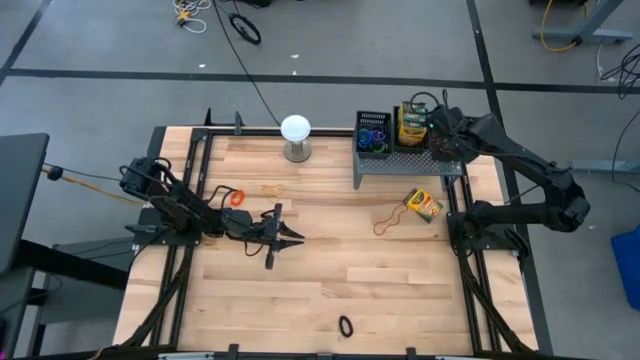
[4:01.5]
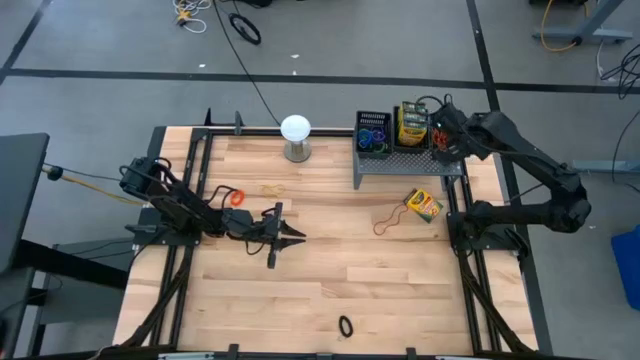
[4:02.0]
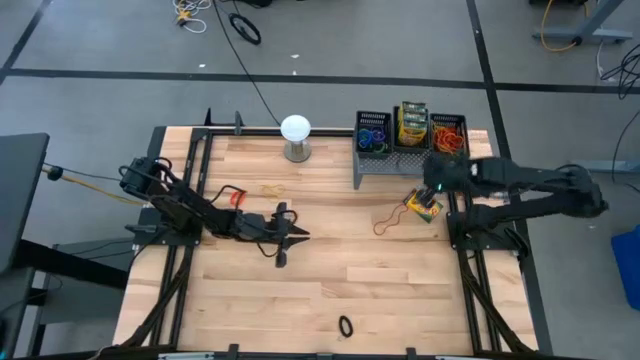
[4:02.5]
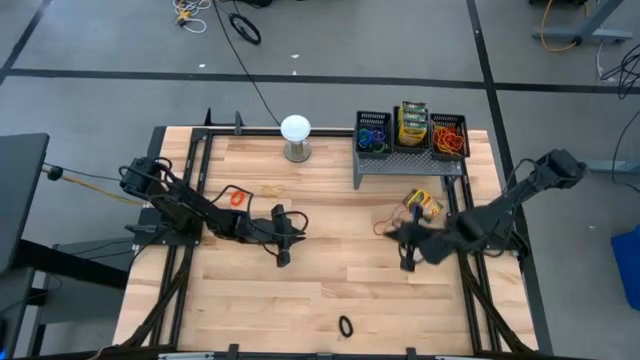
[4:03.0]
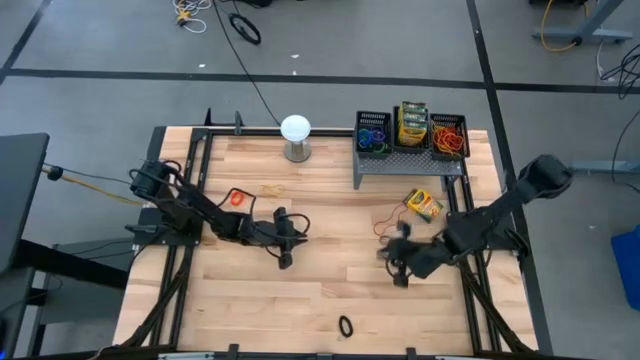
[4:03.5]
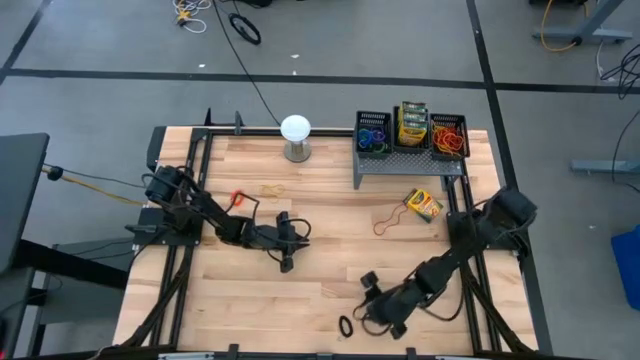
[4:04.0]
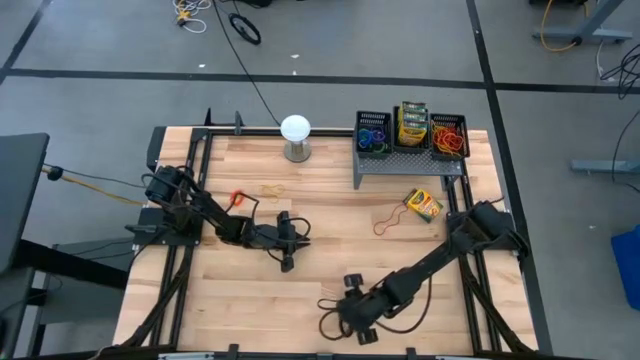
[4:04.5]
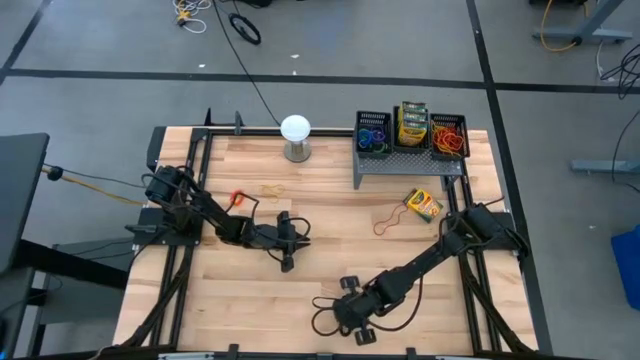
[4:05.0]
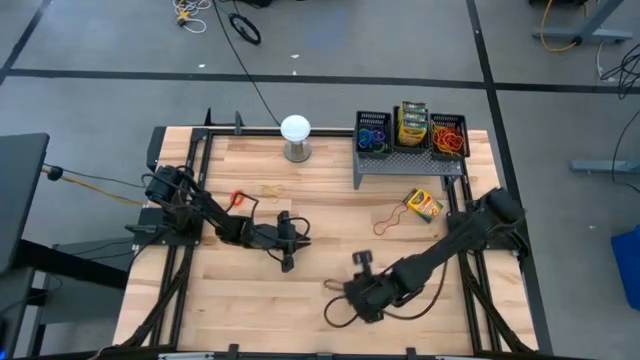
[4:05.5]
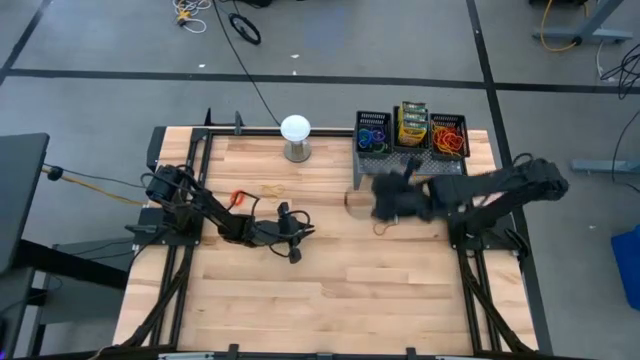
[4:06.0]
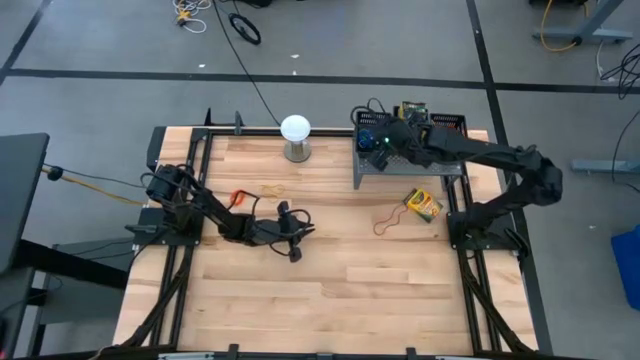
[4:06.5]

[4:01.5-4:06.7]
Task: Pick & Place Office Desk Supplies
Put the black spring keychain into the left black basket on the shelf

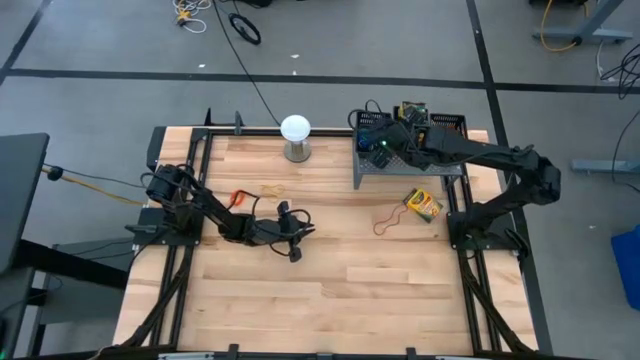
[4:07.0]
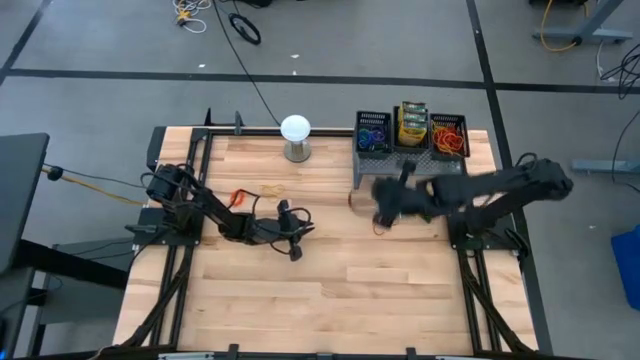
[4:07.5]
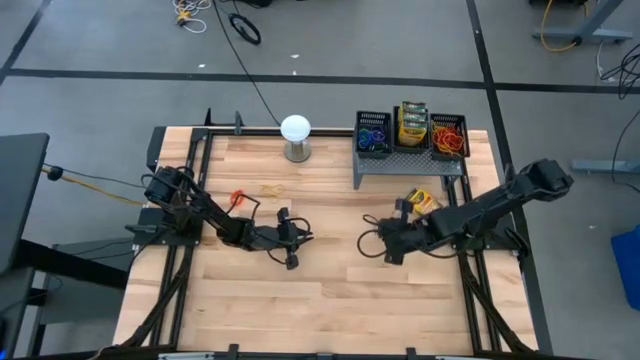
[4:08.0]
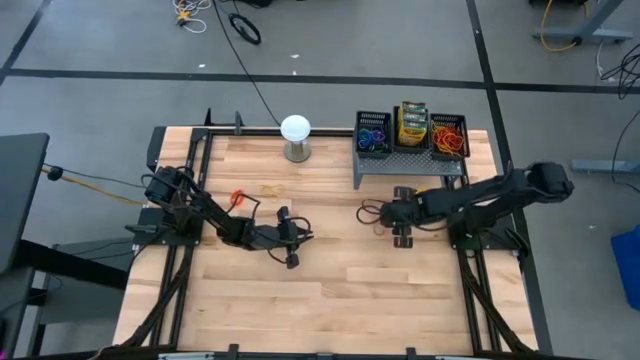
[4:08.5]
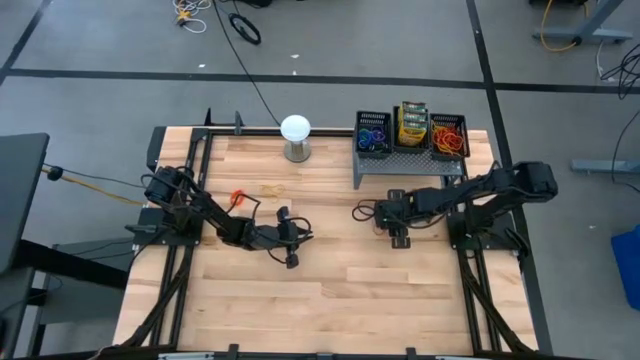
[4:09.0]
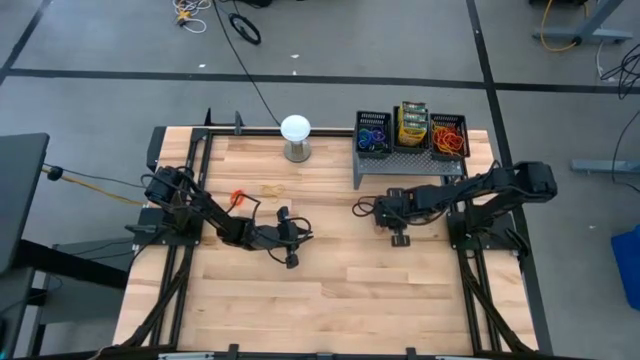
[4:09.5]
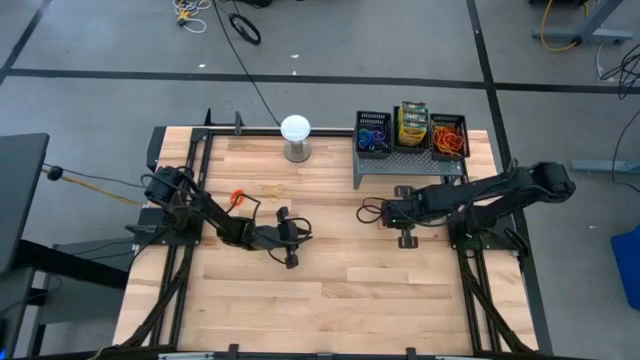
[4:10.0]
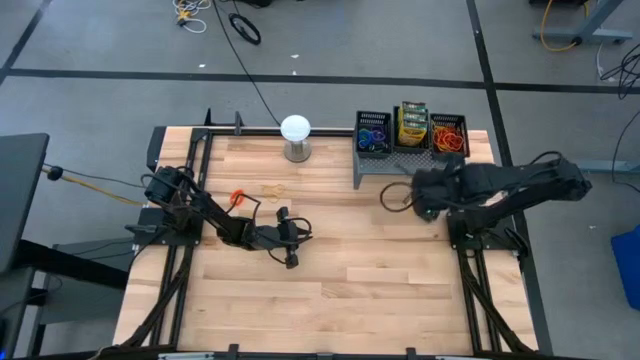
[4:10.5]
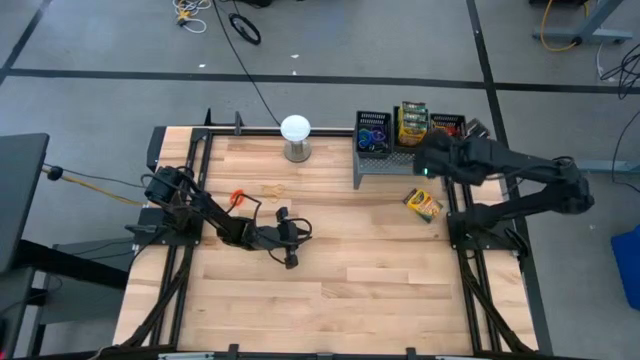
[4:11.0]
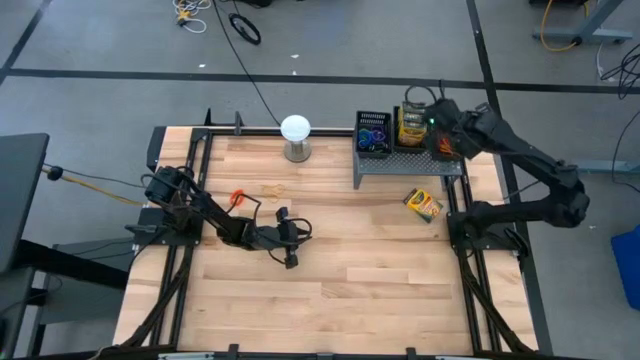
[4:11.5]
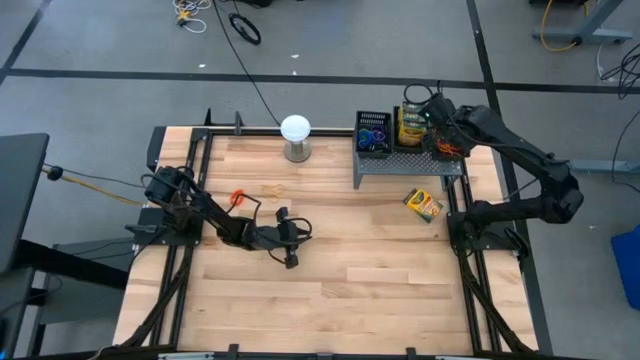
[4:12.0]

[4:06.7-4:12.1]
Put the red rubberband into the right black basket on the shelf

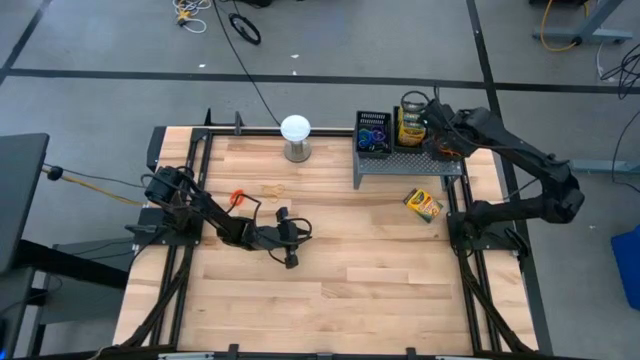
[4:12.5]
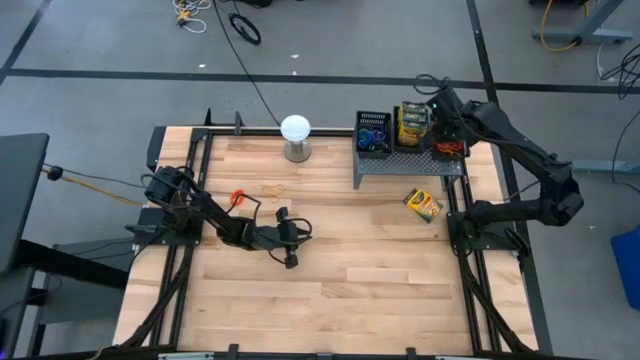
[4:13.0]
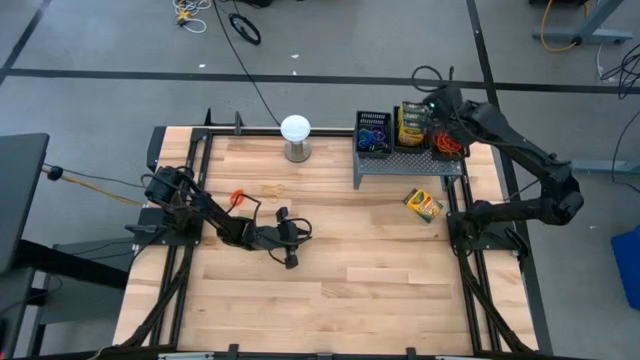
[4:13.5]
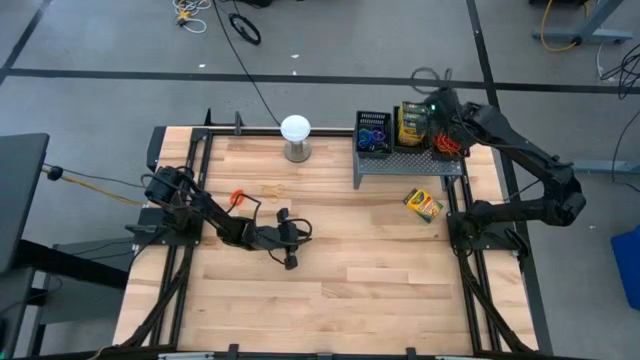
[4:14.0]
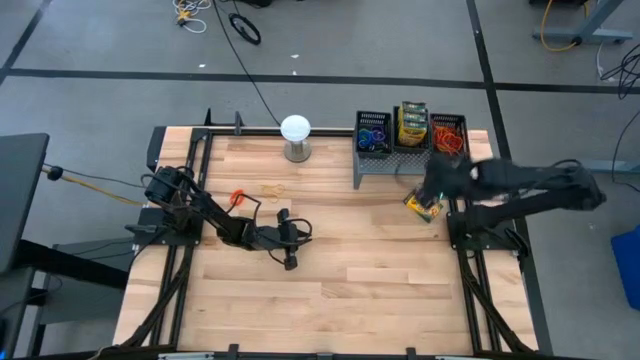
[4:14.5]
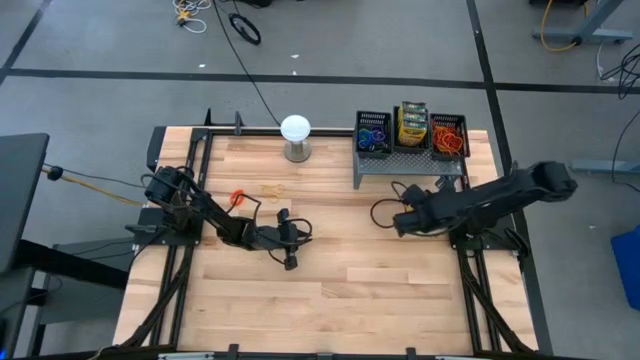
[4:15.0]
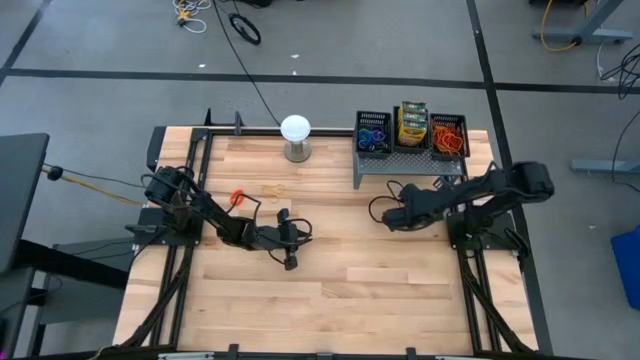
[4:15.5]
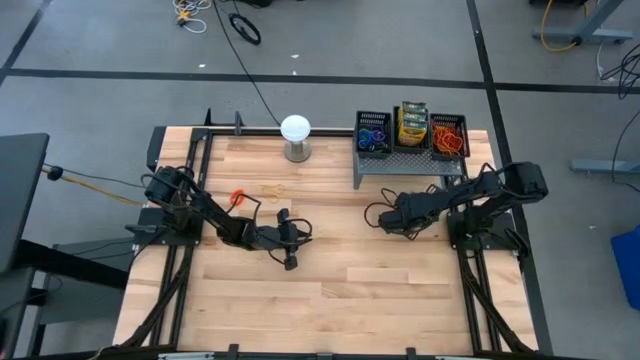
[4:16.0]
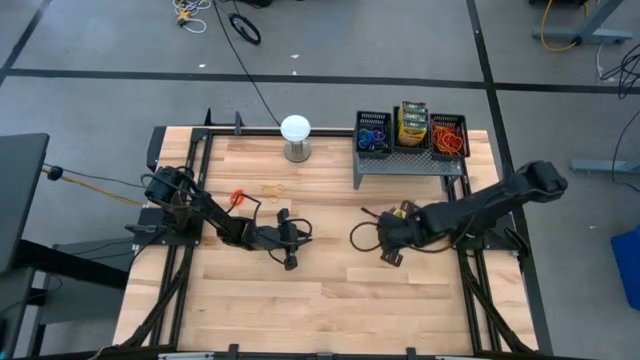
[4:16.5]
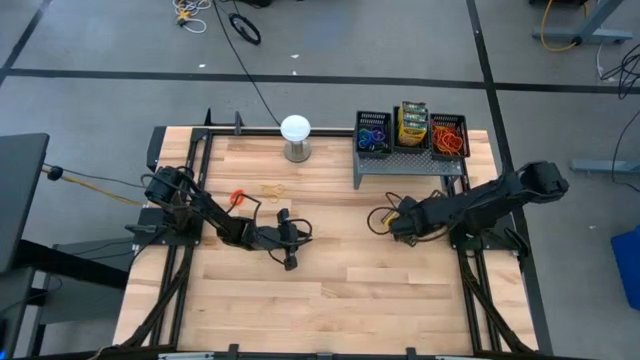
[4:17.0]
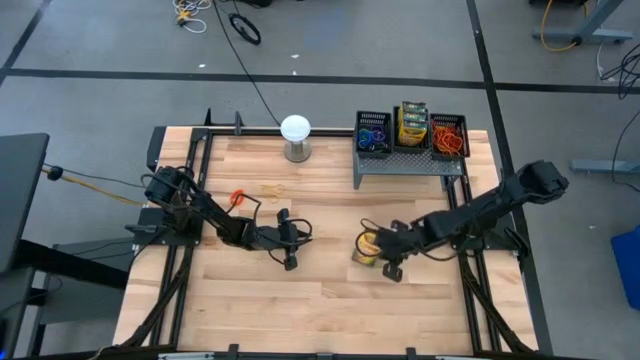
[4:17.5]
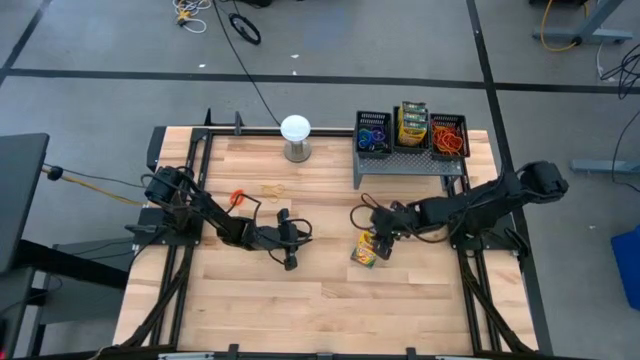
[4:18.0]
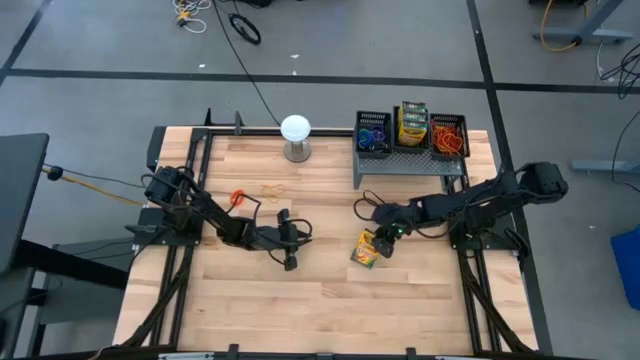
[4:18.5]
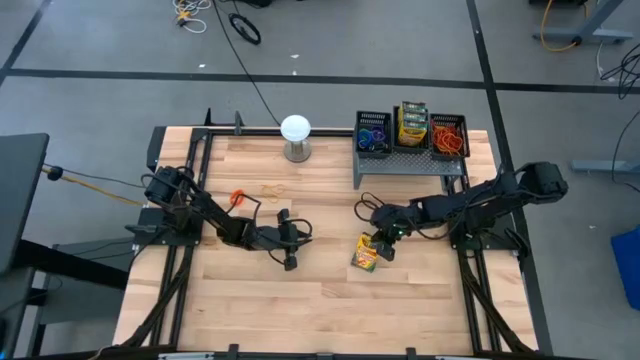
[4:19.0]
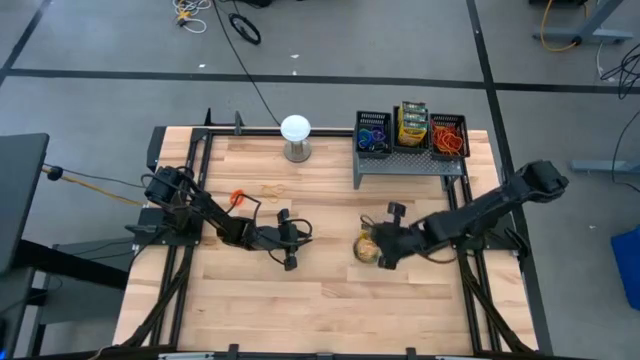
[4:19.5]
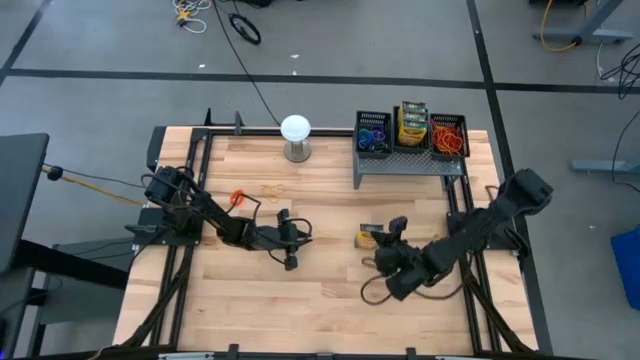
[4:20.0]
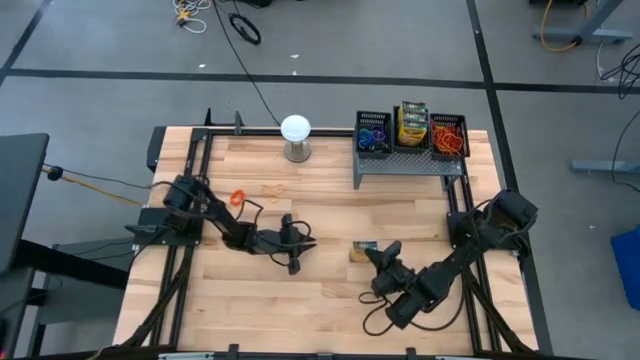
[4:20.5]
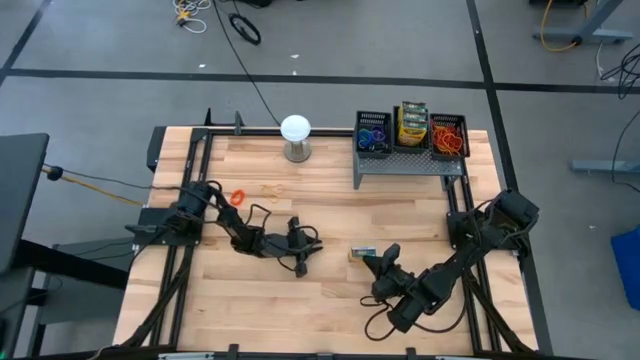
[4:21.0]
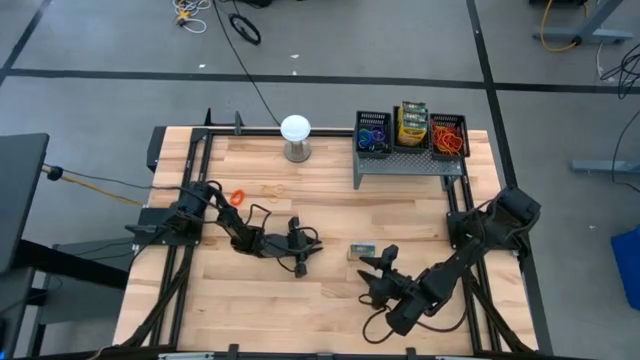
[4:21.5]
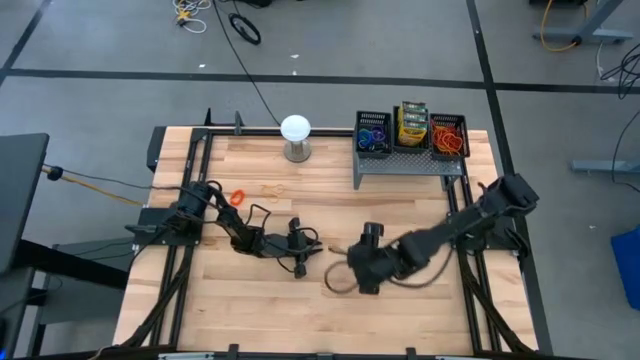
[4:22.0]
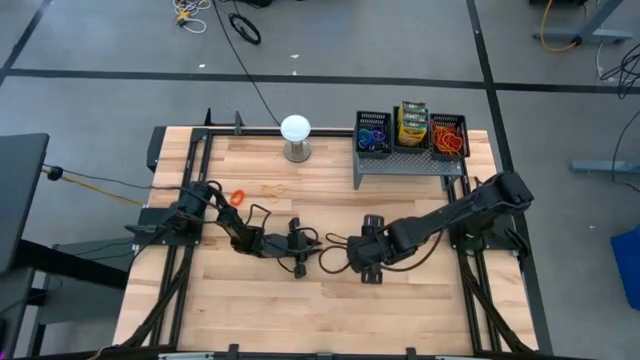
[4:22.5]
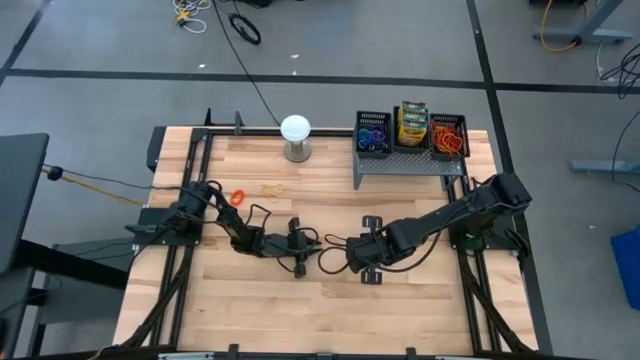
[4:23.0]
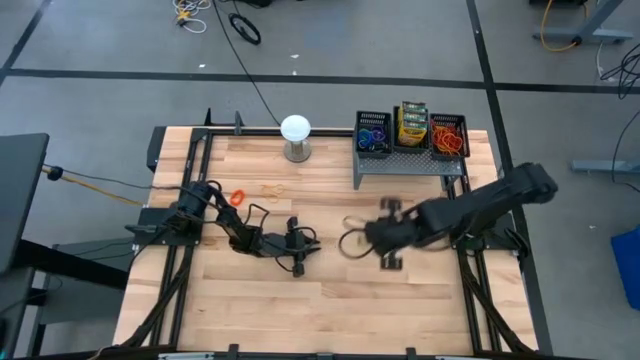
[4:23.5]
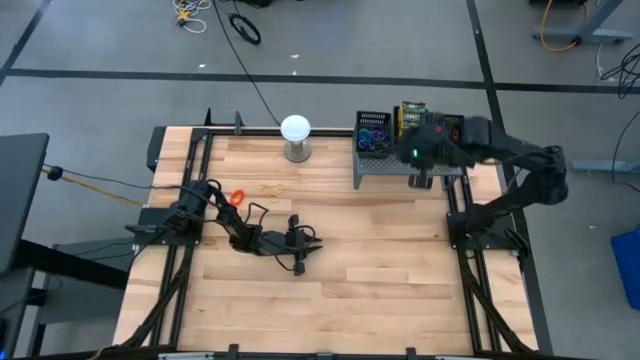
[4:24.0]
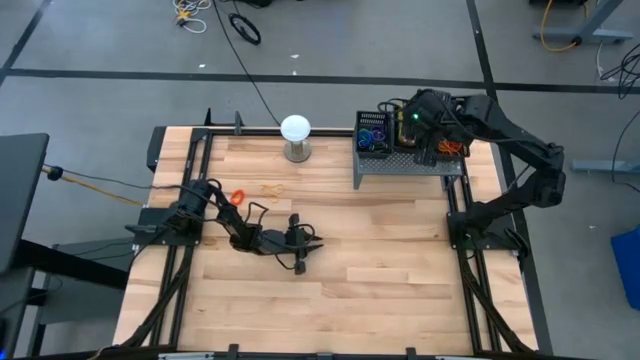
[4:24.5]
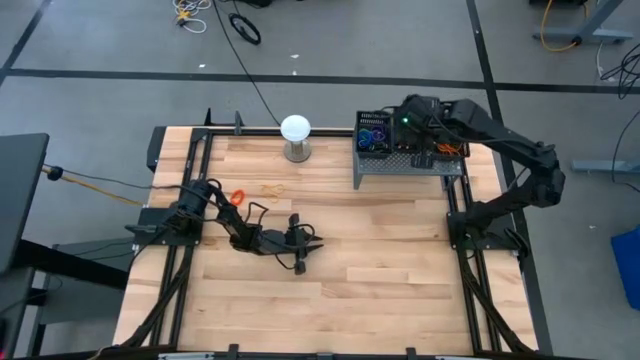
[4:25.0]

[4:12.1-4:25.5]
Put the yellow crayon box into the middle black basket on the shelf
